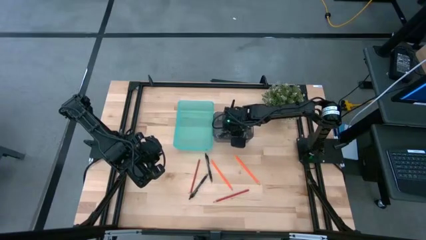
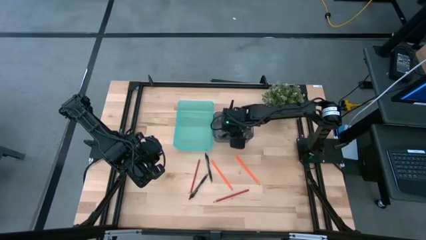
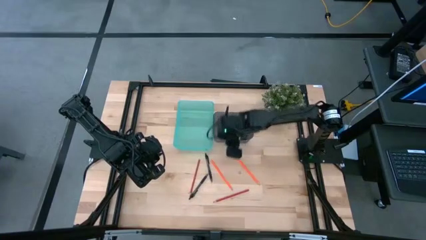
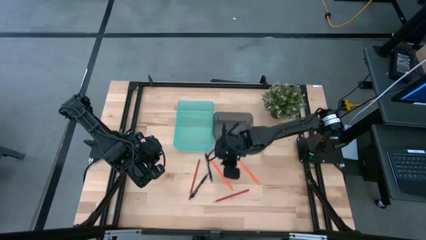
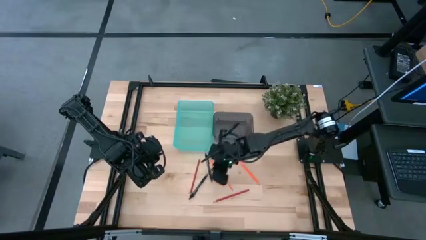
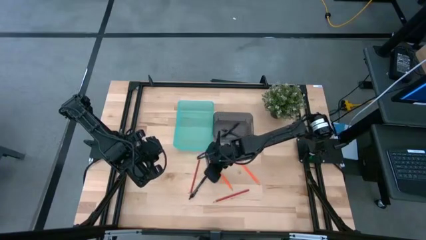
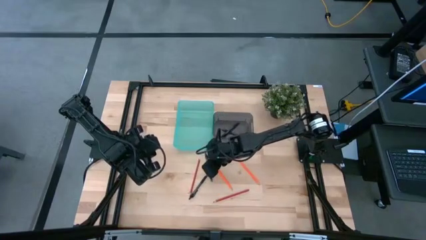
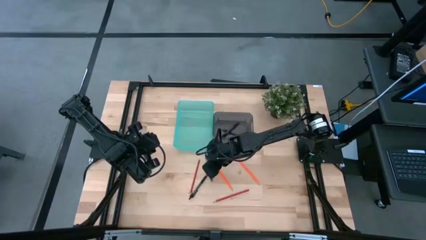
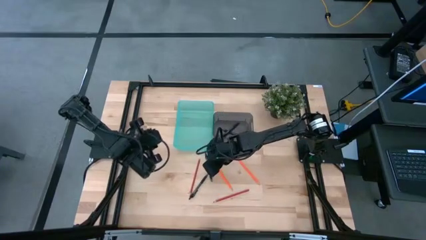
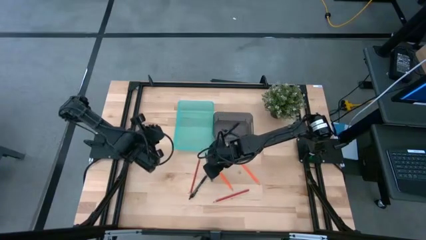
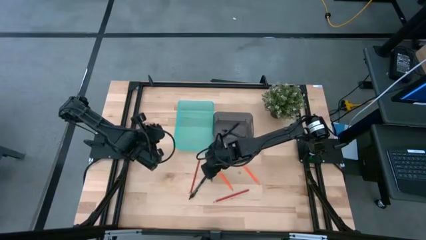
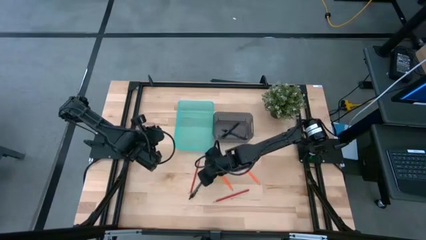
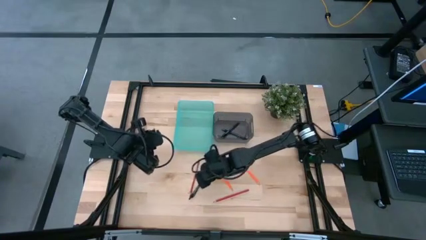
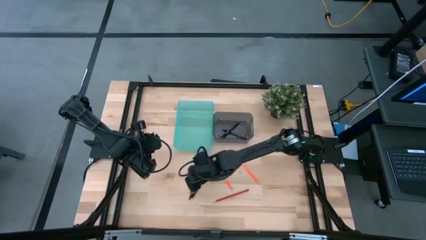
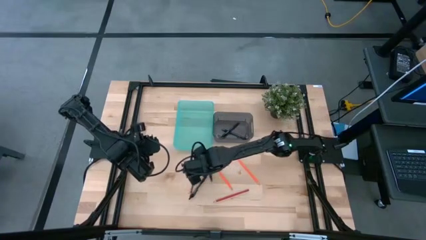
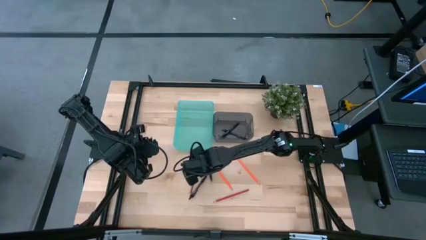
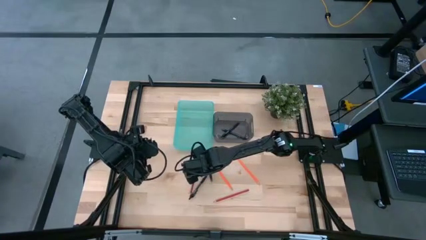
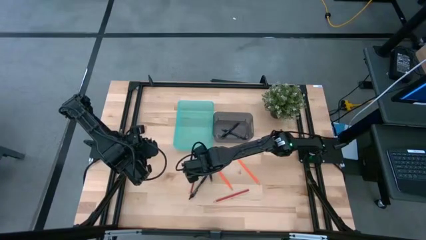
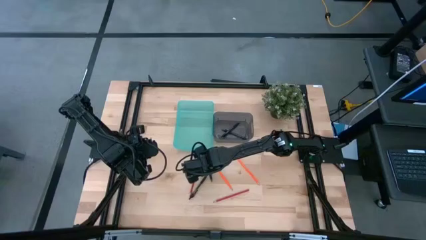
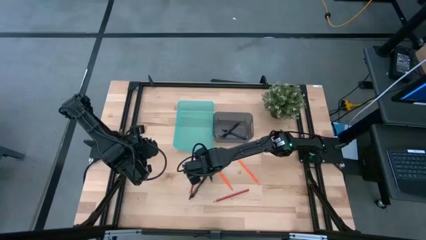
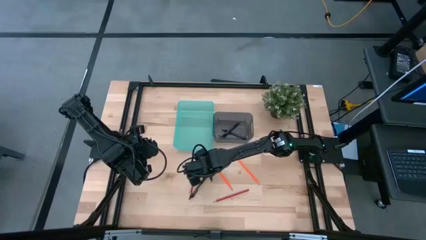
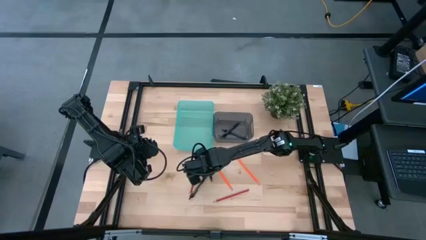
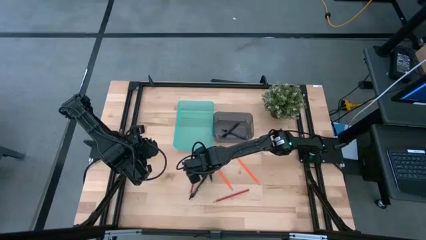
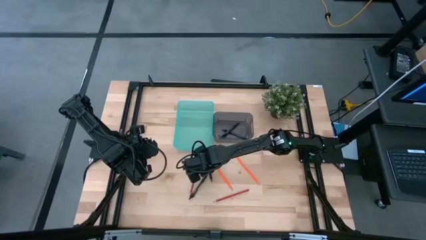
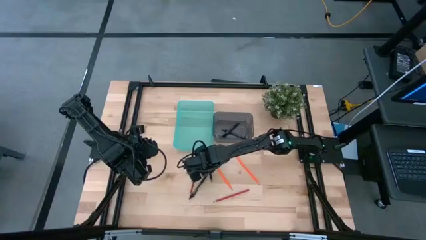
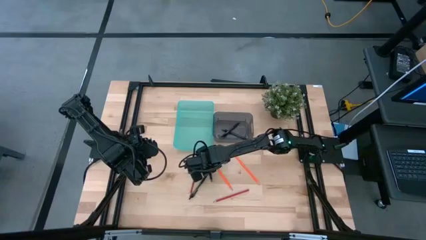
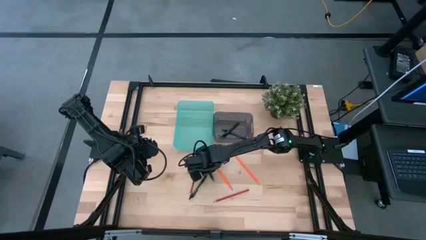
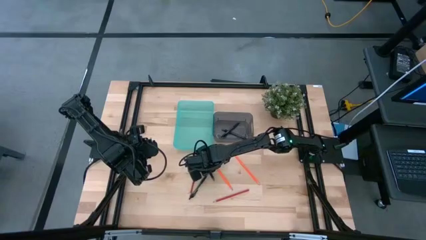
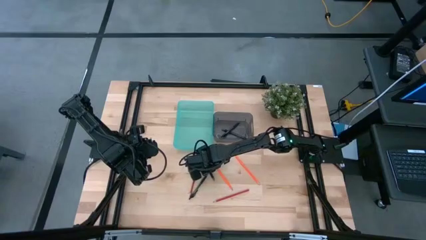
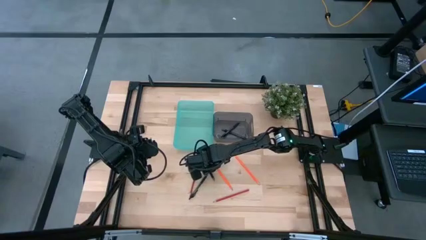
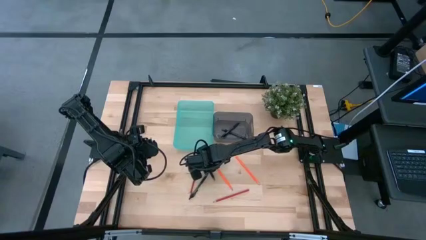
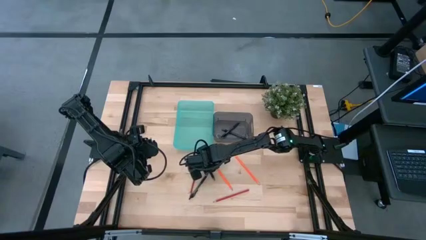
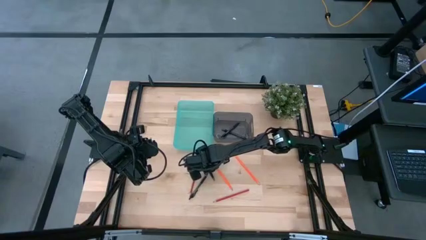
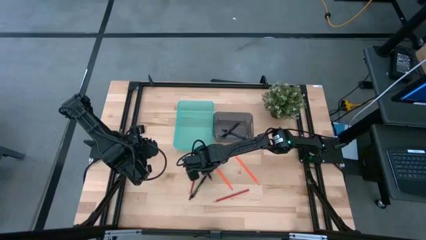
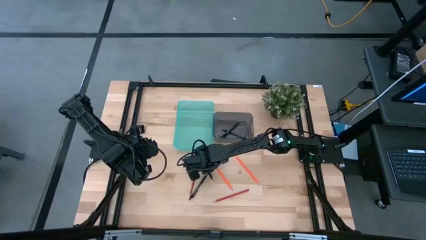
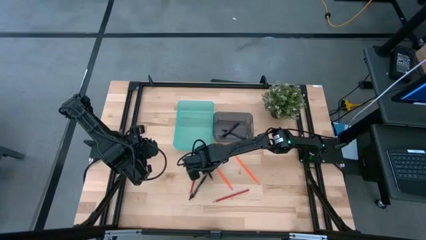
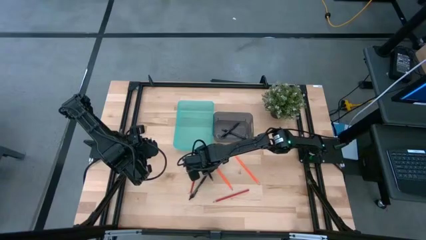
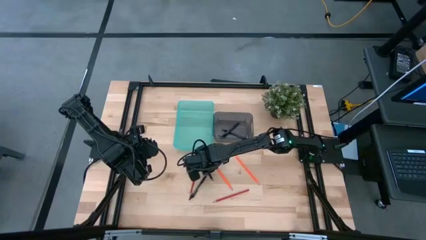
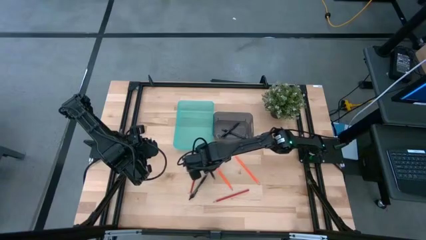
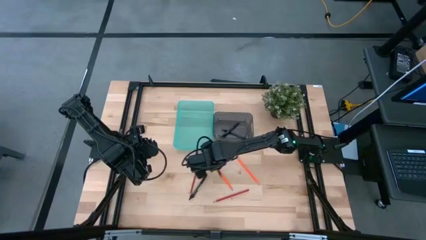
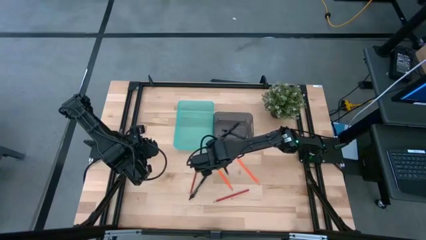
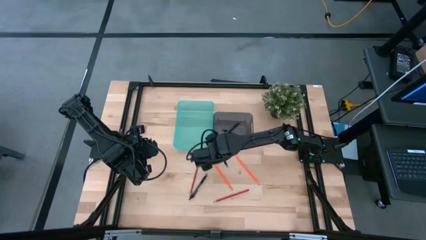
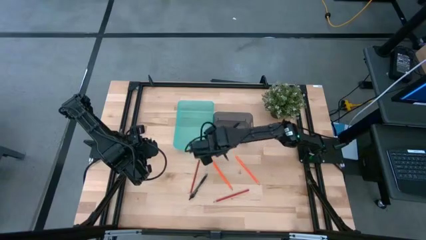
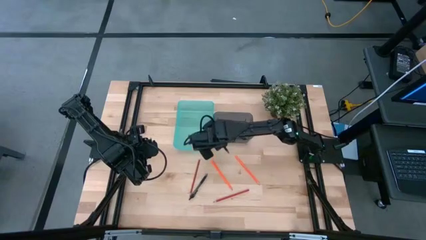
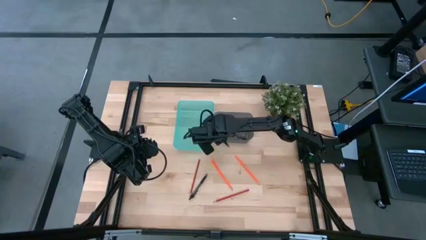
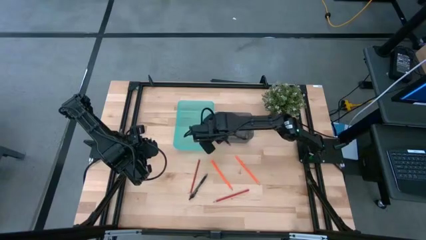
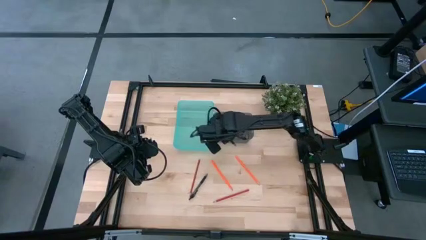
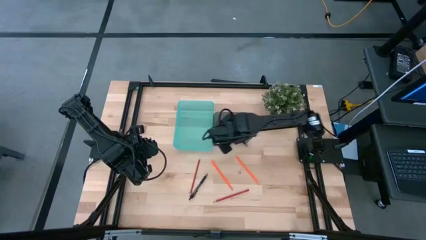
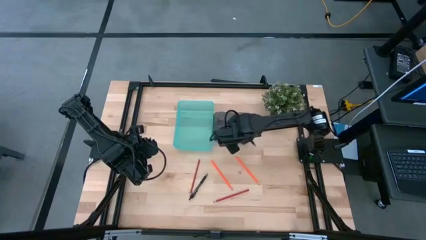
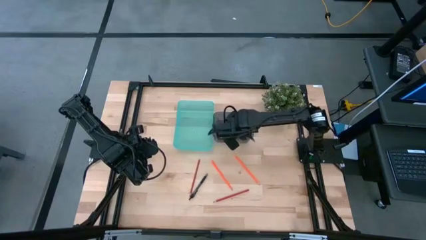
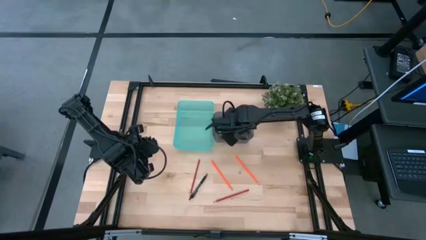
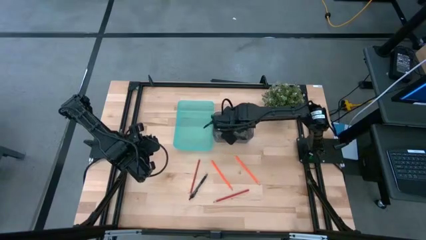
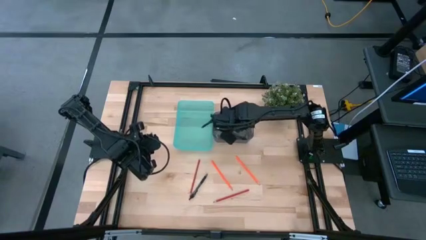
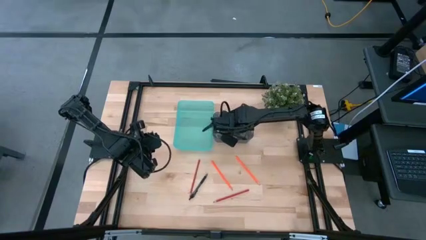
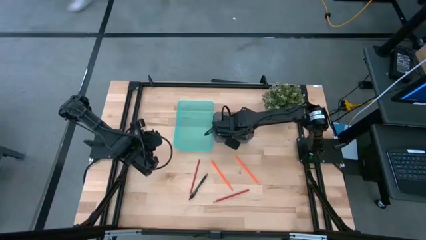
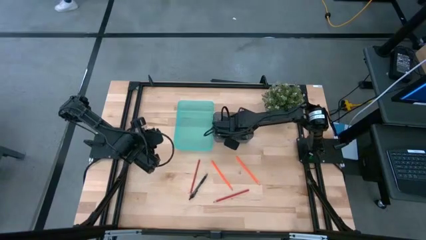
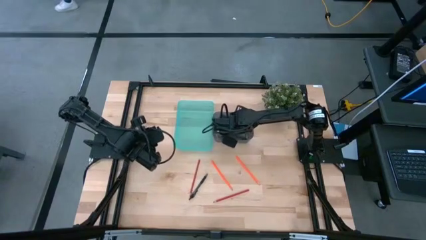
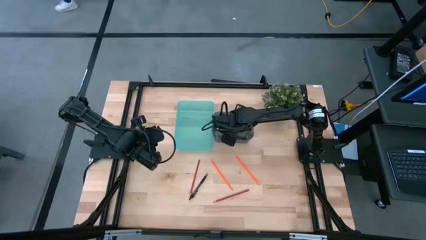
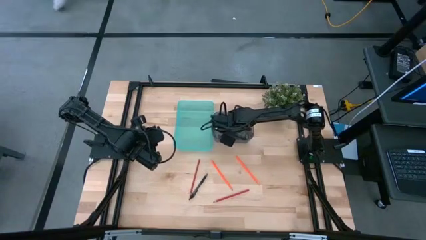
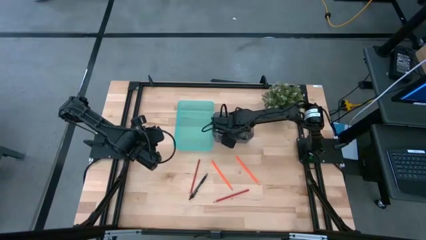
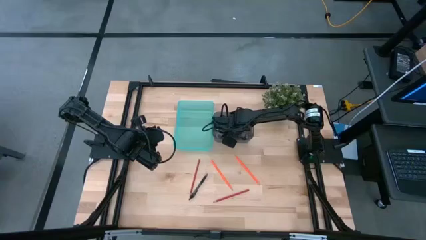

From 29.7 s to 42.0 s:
Task: Sort pens & pencils
Put the black pen into the black bin

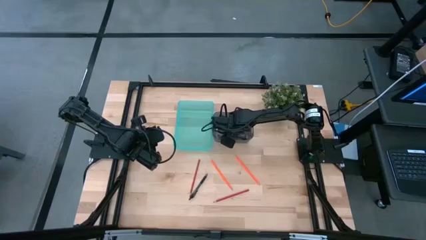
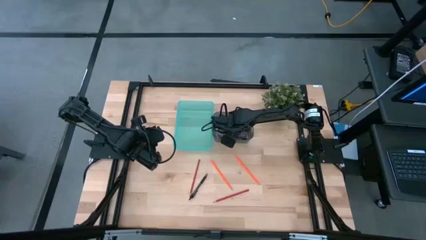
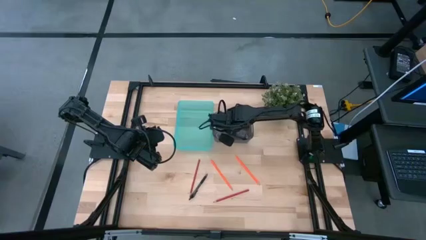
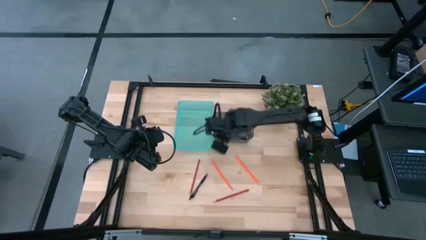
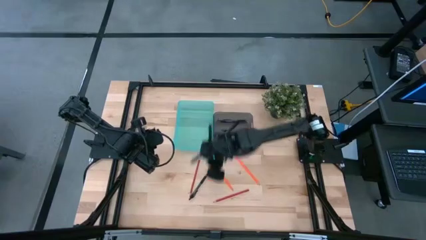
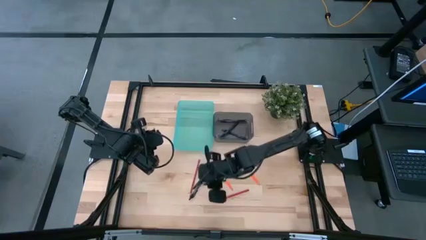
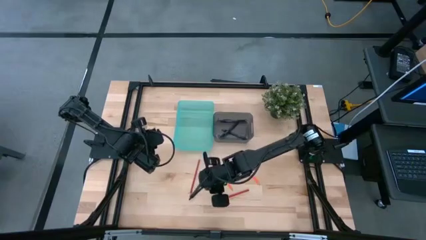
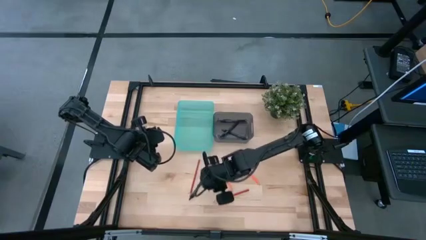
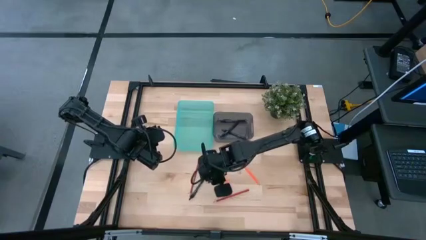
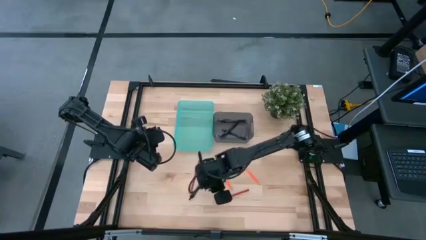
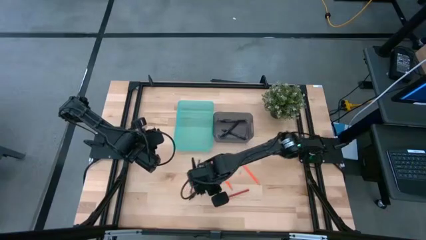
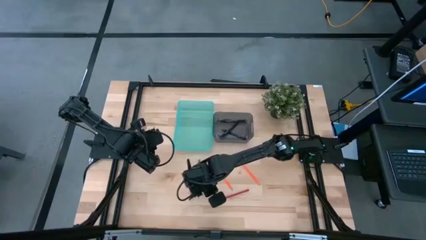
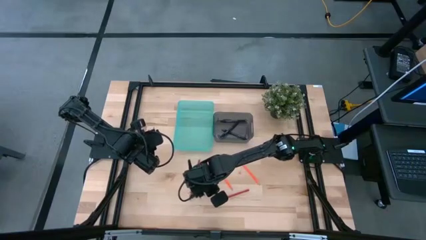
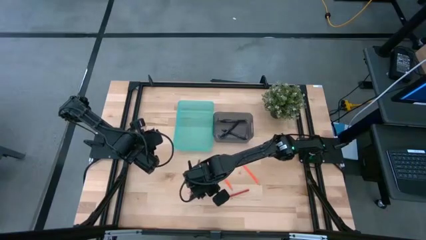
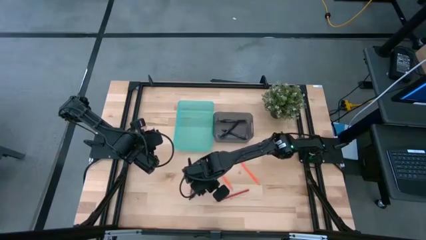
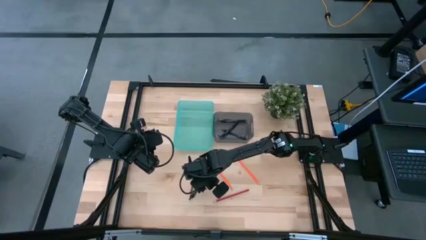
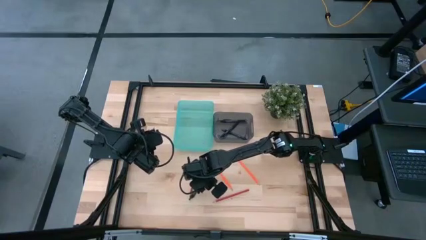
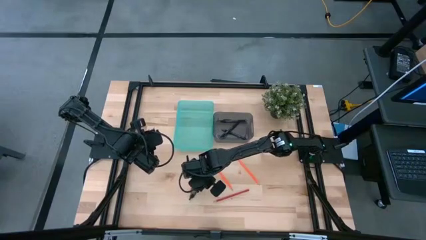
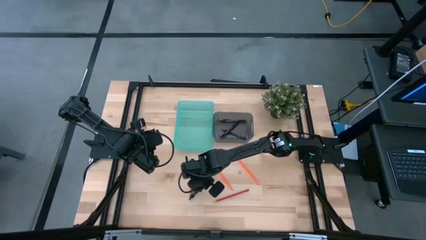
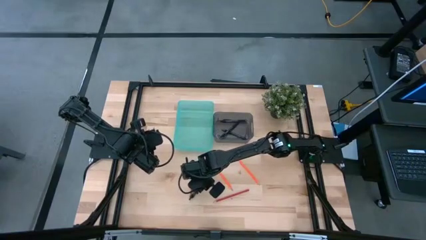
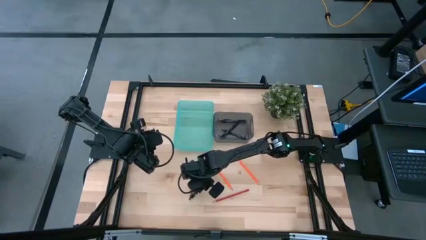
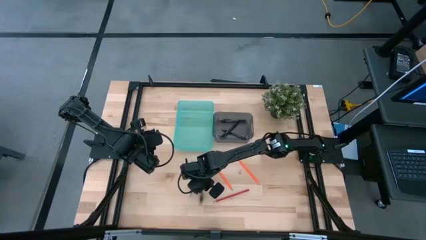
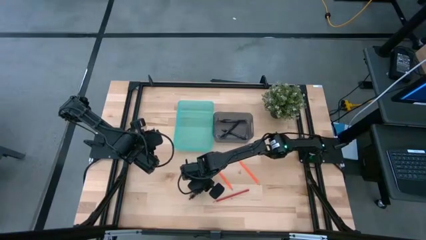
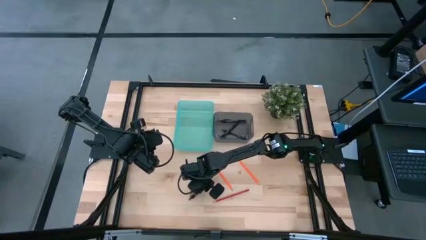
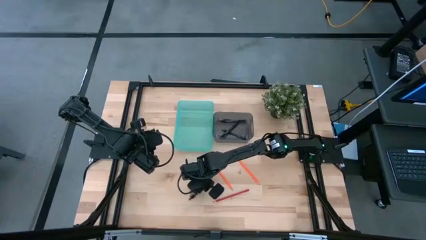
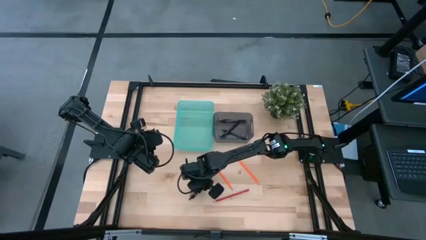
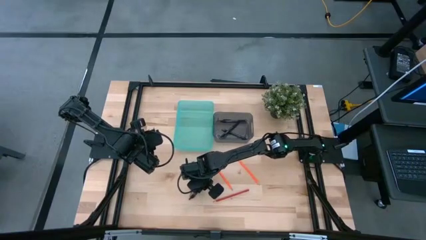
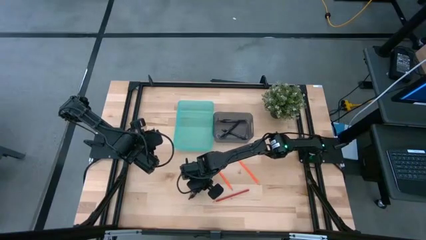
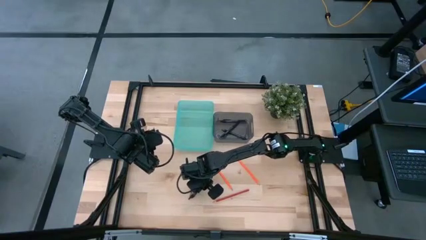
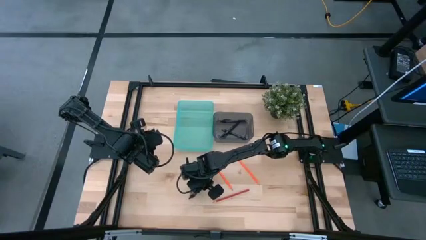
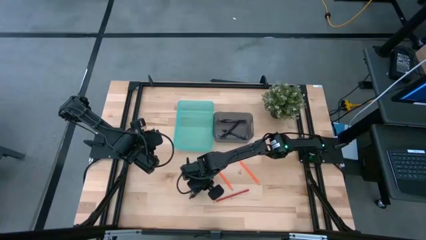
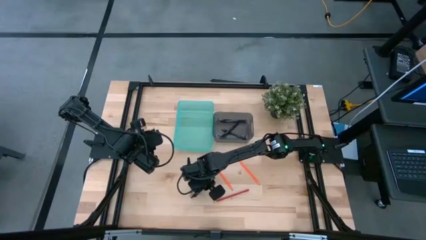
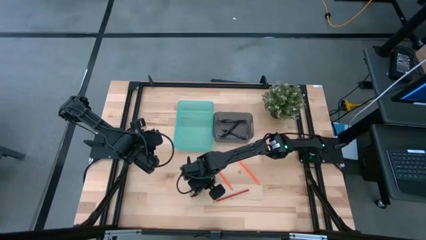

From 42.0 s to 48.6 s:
Put the black pen into the black bin
